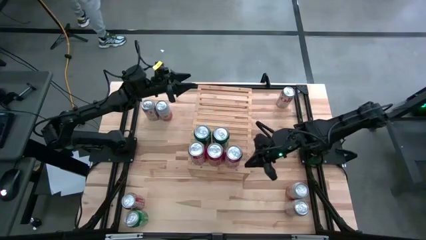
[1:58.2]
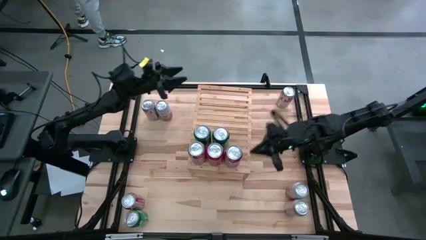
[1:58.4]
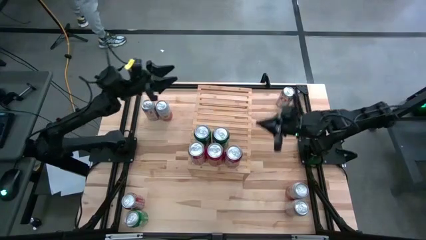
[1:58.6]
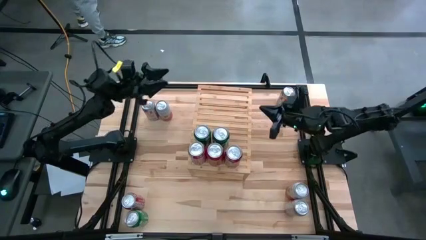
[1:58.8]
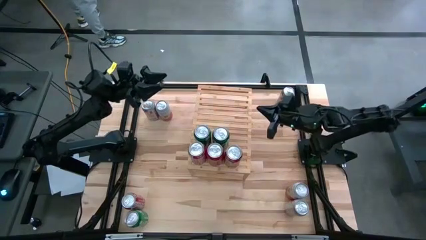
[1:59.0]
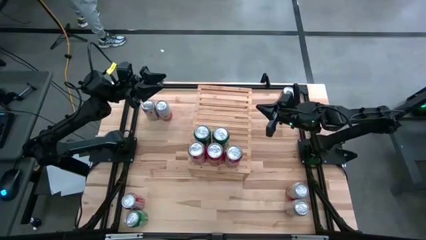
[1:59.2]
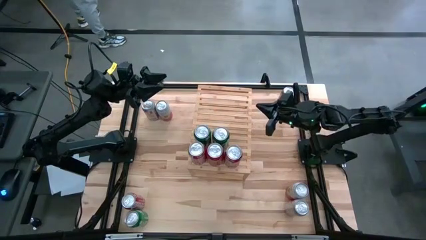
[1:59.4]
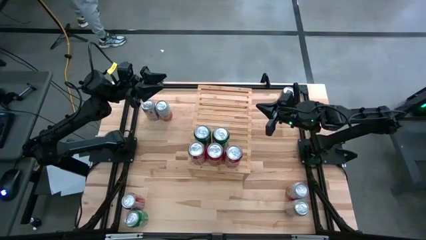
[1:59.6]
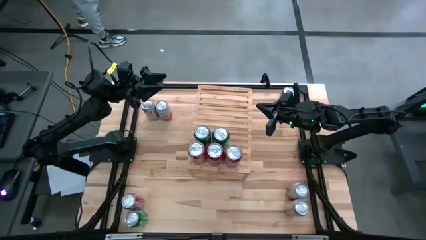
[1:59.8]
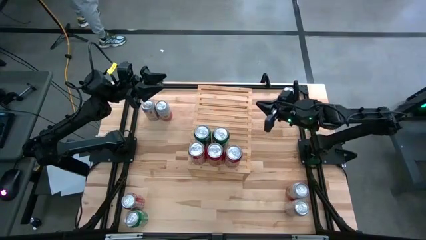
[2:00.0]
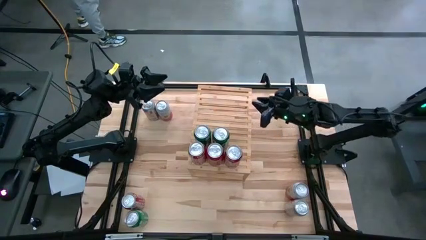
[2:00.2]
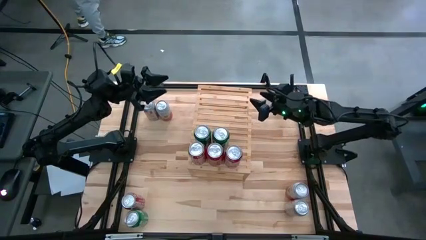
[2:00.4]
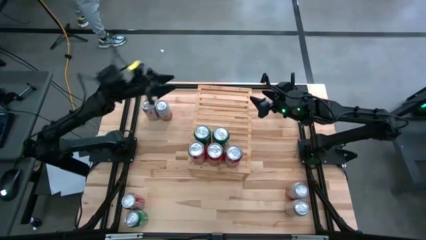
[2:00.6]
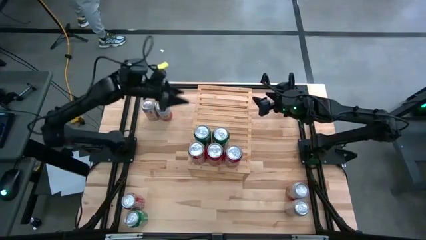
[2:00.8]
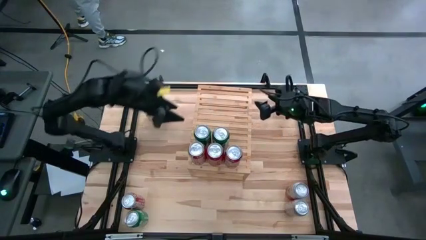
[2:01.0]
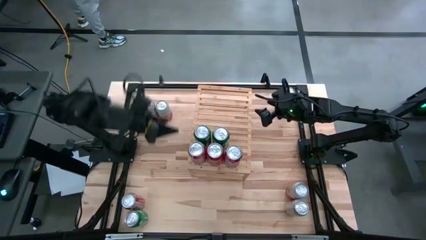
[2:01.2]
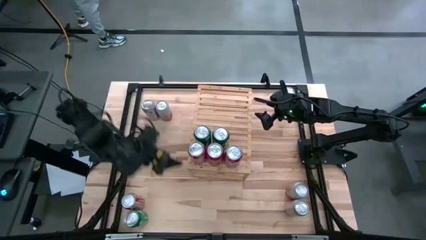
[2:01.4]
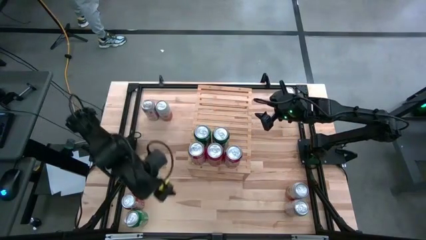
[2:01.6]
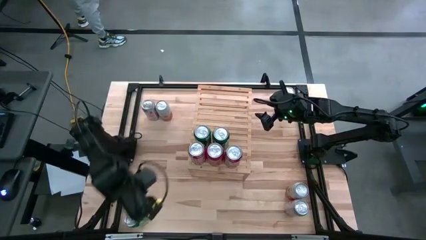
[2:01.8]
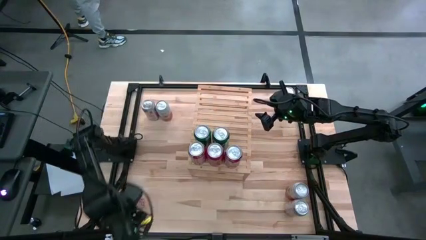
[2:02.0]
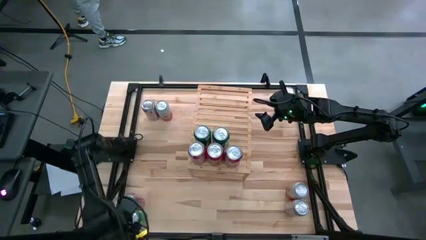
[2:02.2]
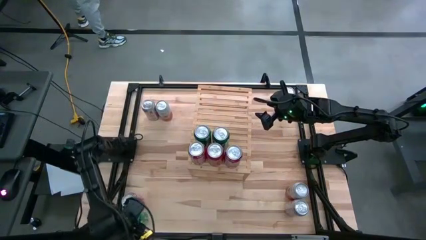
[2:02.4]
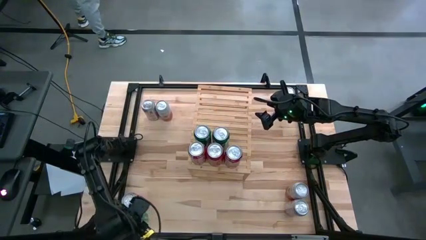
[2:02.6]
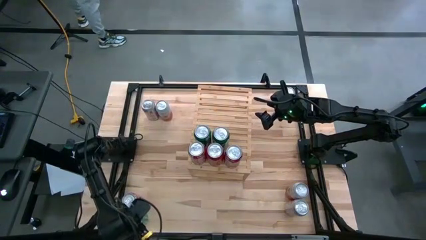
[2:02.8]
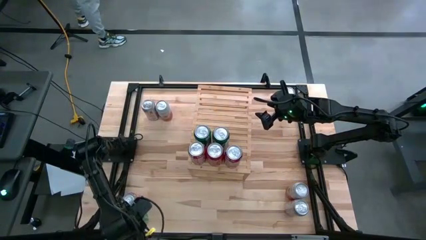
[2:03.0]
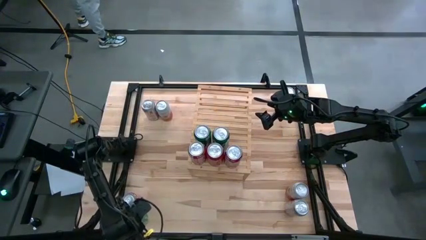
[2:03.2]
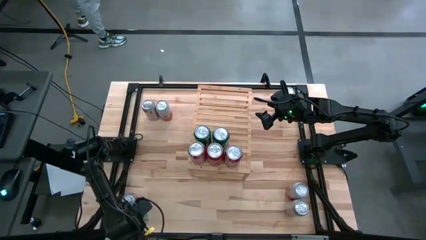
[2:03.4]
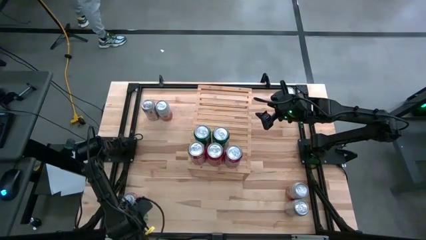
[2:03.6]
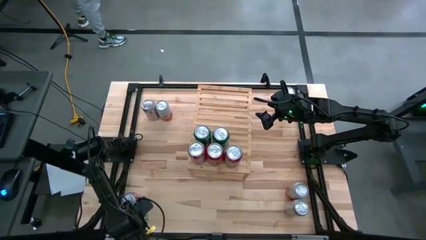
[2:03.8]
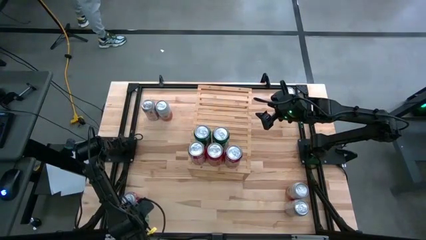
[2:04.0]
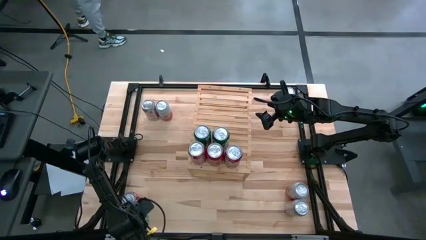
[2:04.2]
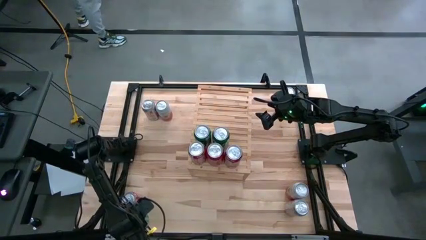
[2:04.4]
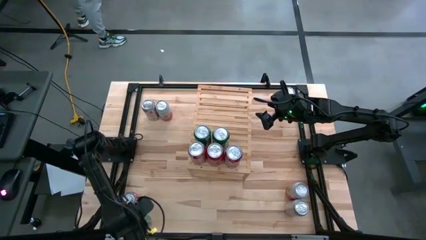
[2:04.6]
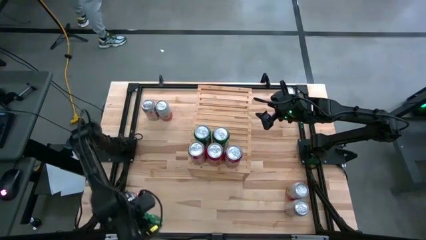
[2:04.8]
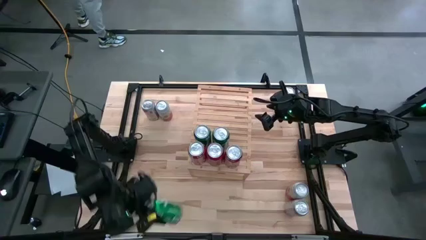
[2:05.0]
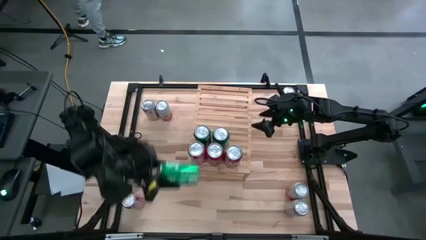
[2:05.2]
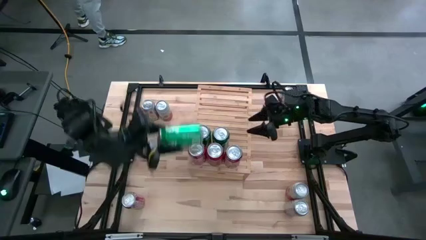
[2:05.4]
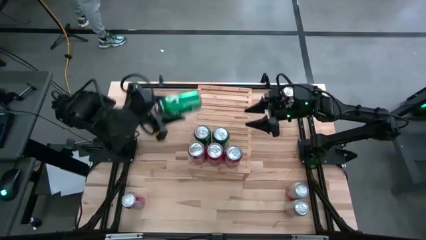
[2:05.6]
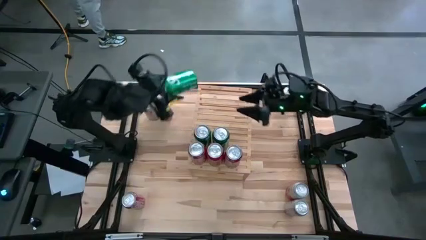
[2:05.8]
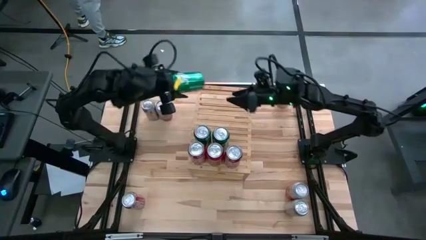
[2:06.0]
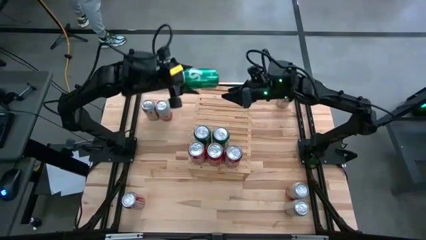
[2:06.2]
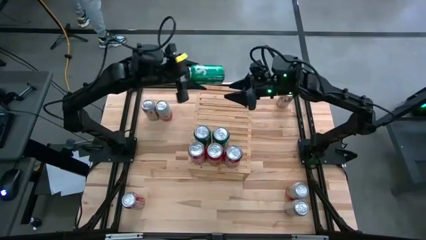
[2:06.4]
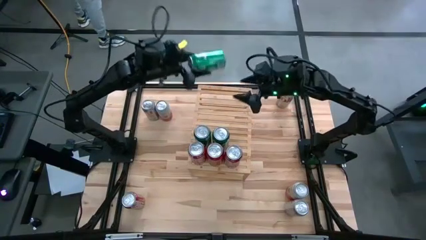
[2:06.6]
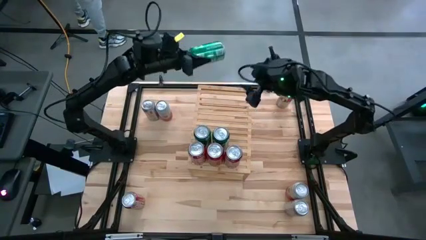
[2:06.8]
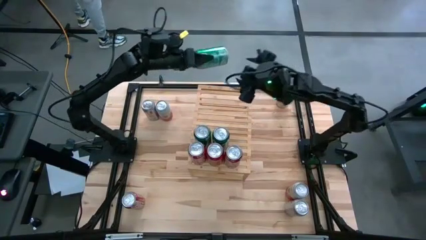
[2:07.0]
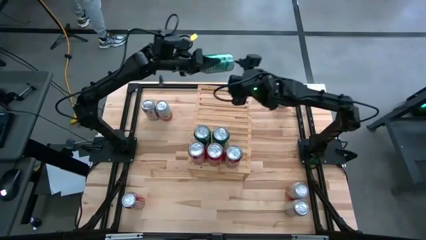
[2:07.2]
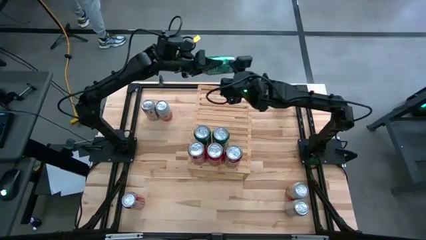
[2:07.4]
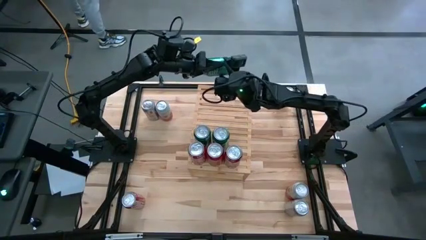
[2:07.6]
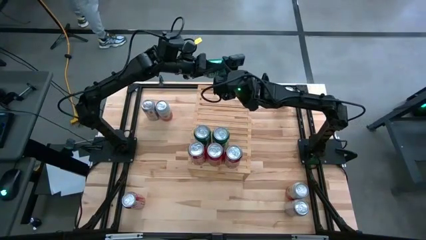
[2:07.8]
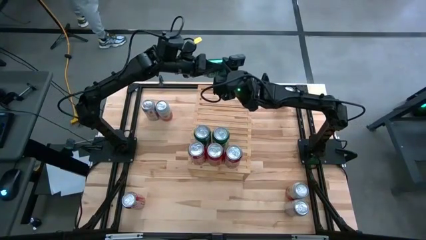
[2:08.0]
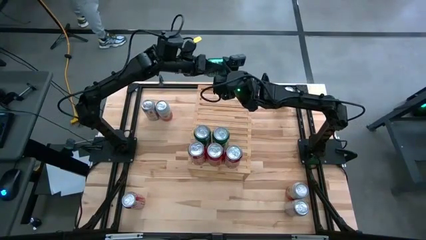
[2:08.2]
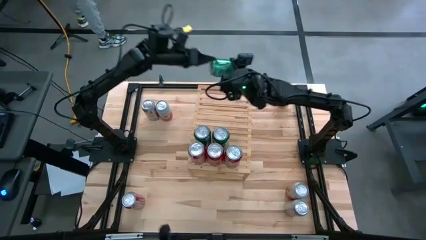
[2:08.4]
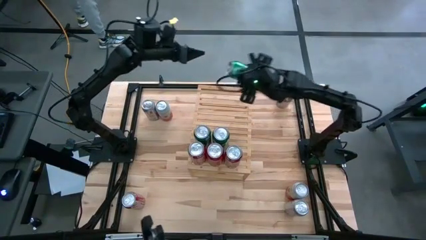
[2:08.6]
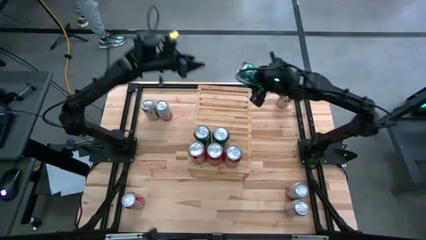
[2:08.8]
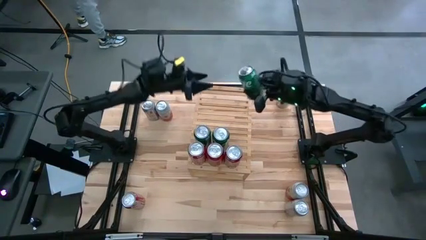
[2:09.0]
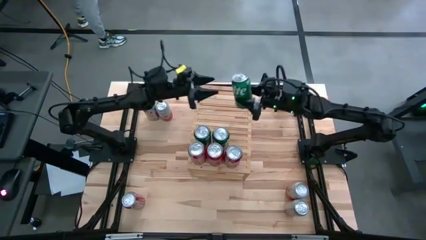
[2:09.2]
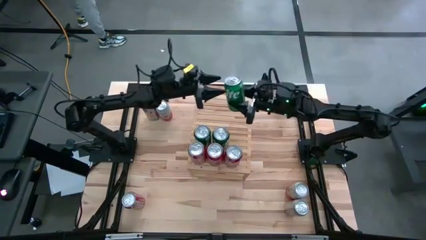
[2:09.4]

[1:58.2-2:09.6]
Task: Place canned beverage on shelf
Put the green soda can on the shelf aligned with the other green soda cans
